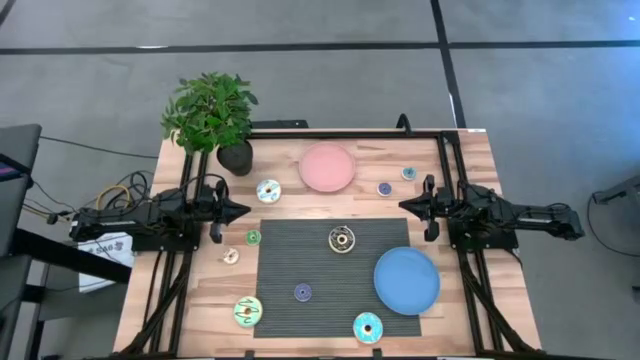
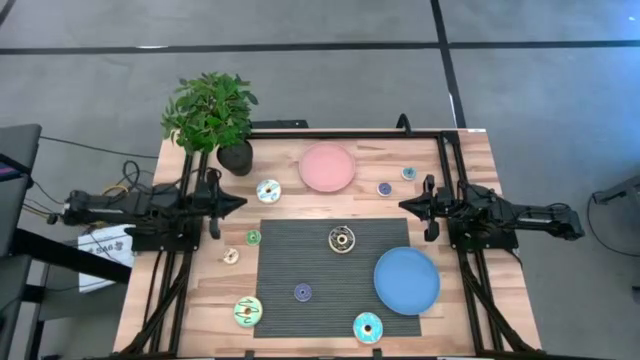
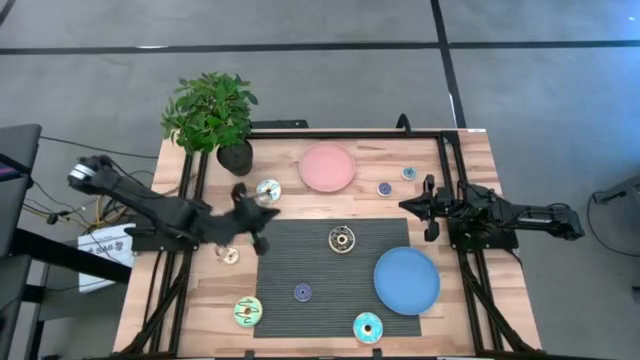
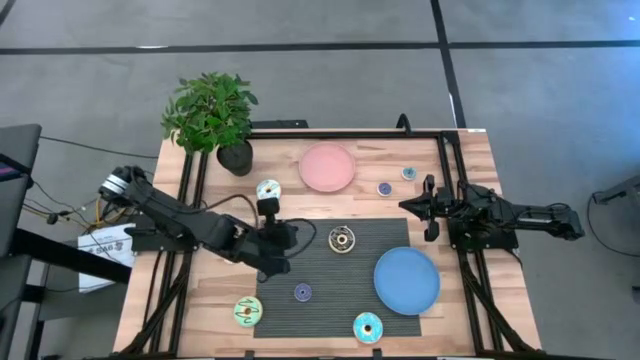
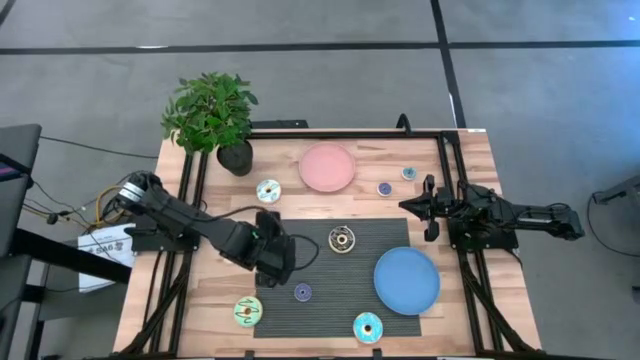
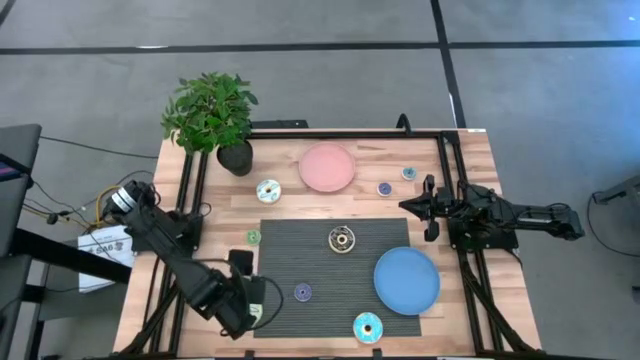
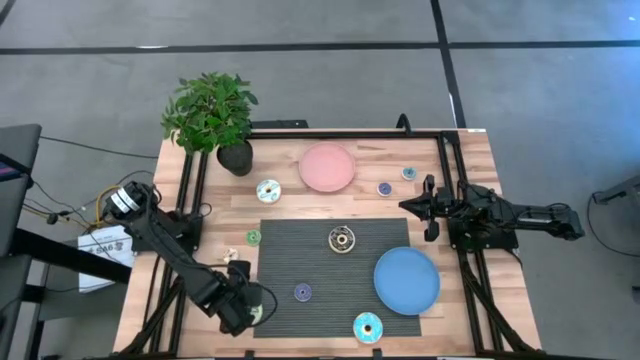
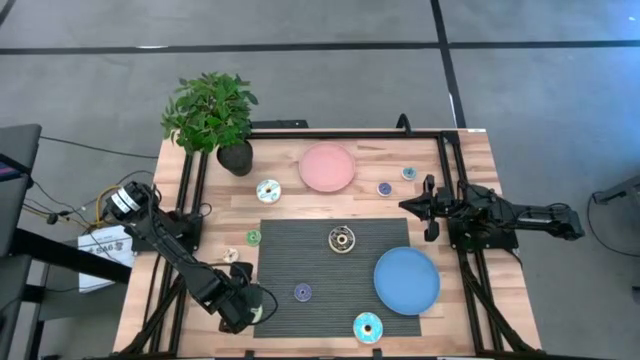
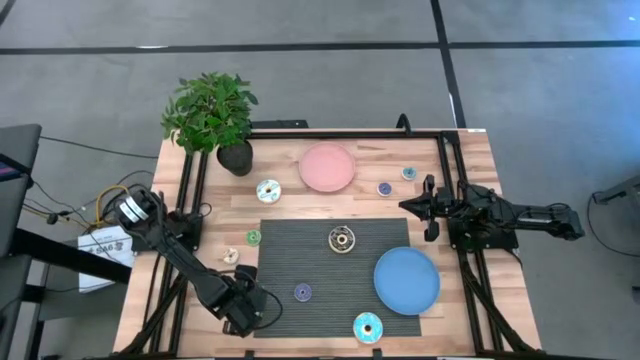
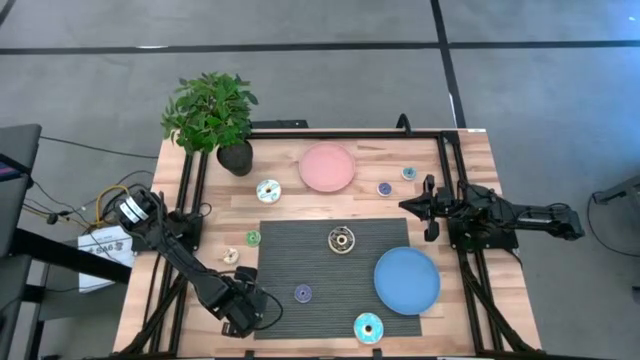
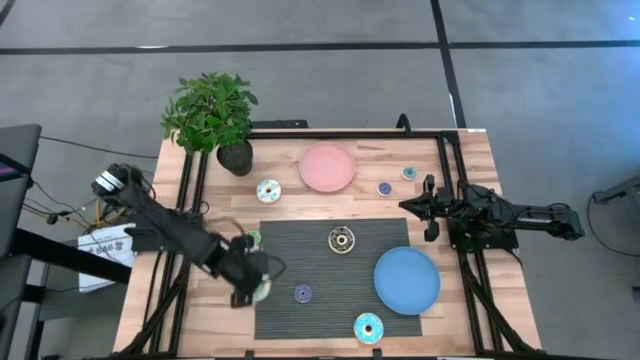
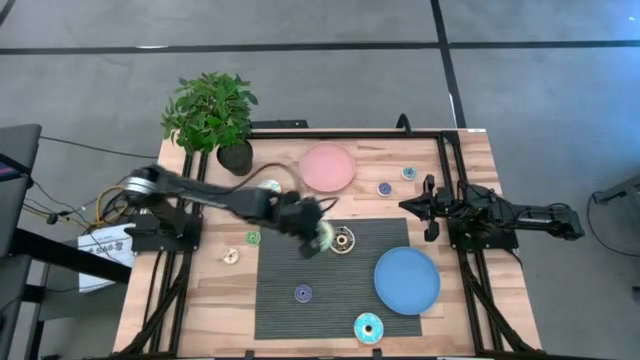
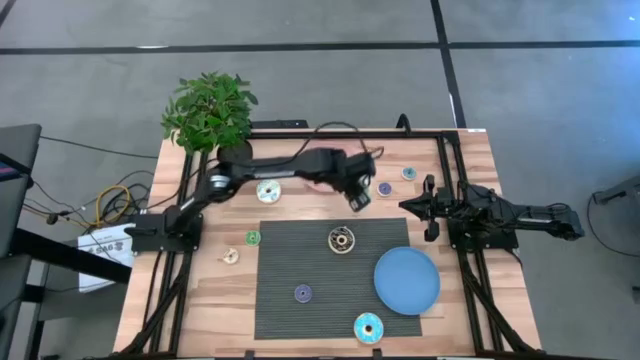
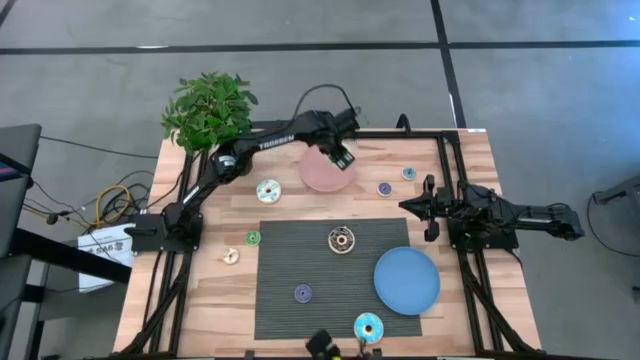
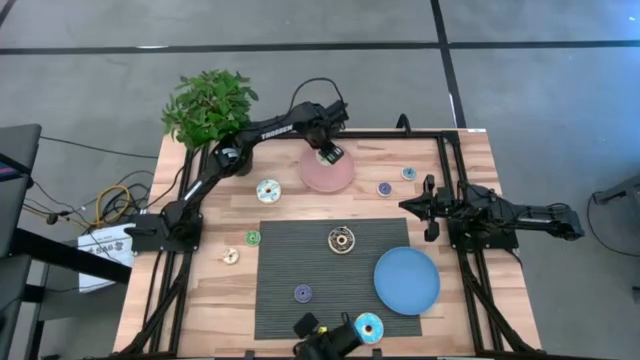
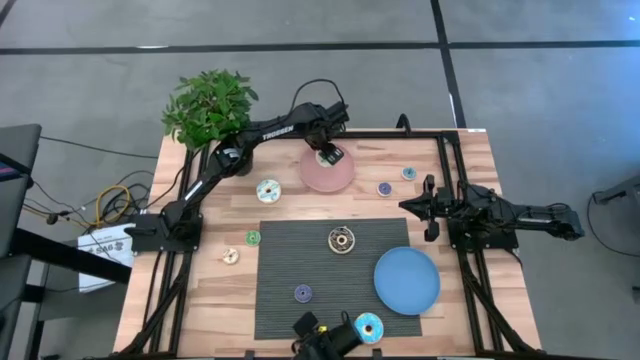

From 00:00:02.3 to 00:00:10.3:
Task: Pick & Place donuts
Put the large blue donut on the pink plate

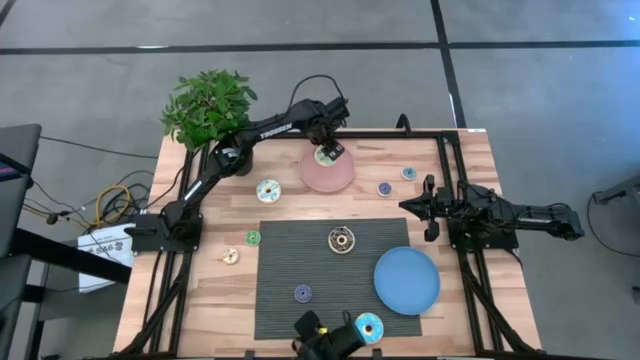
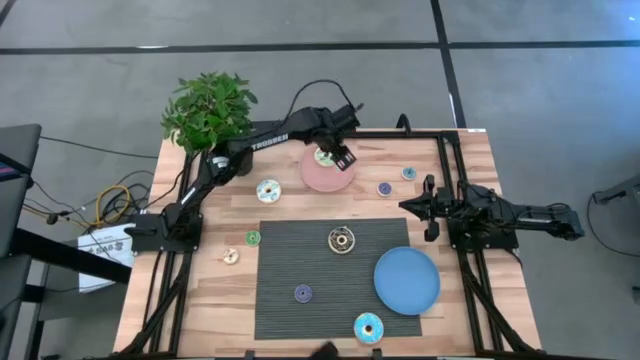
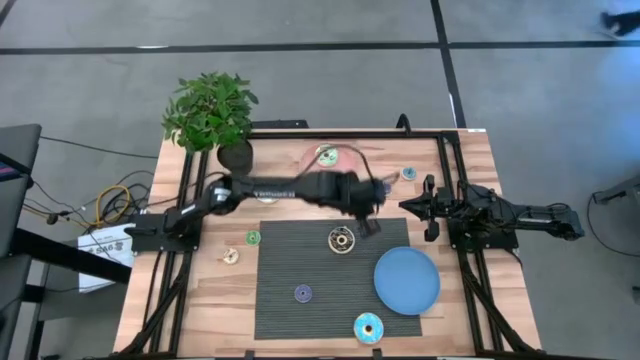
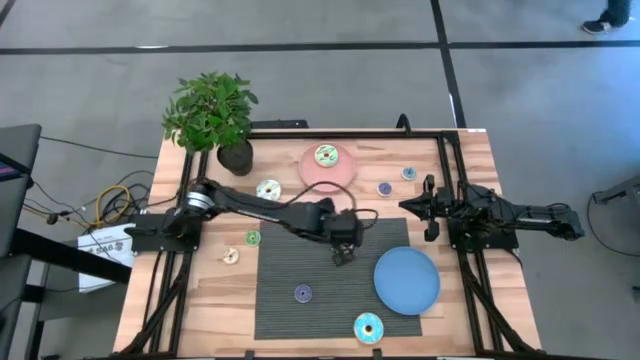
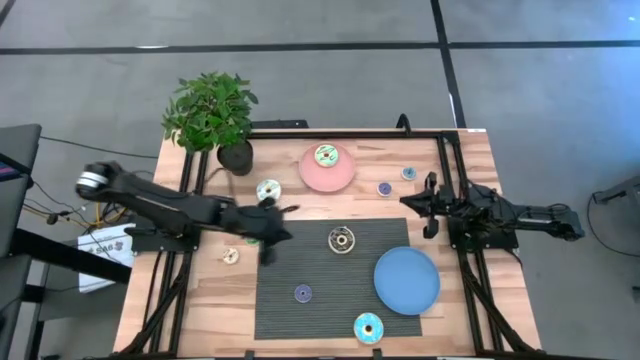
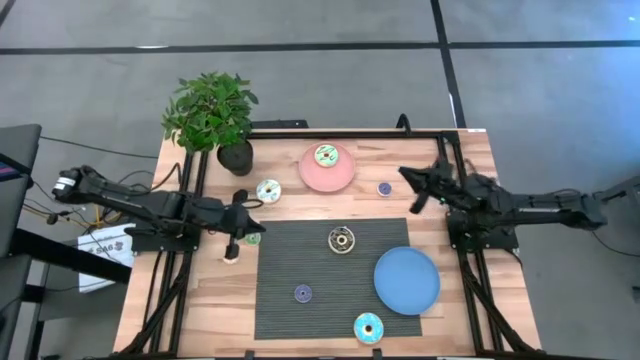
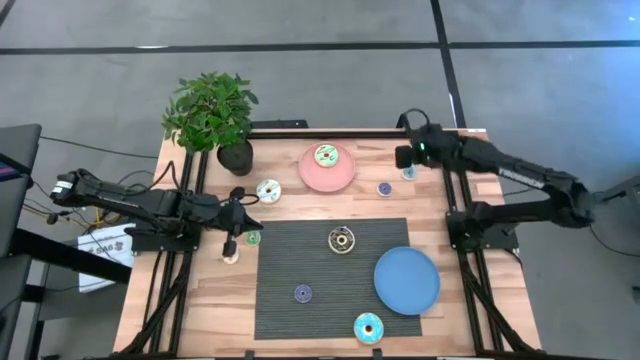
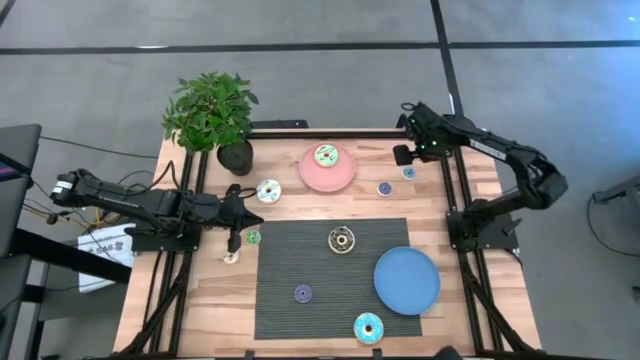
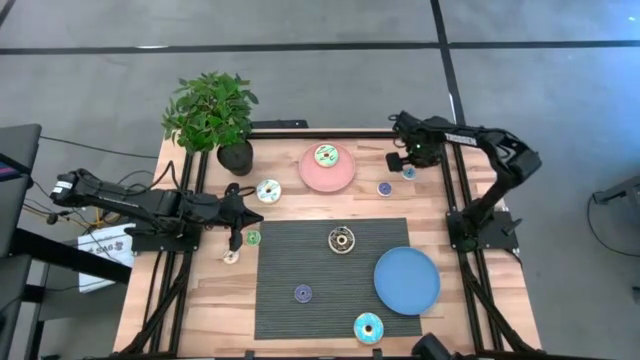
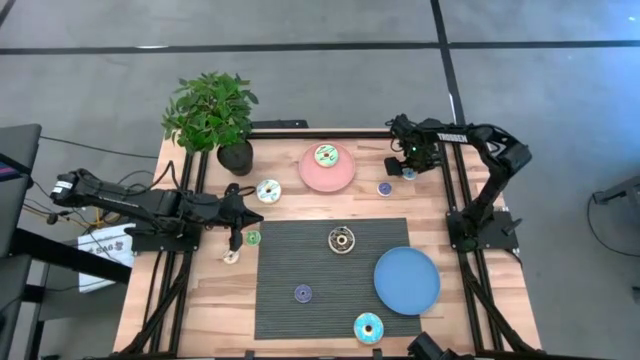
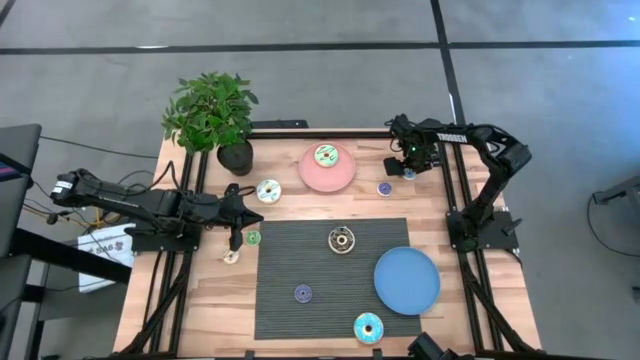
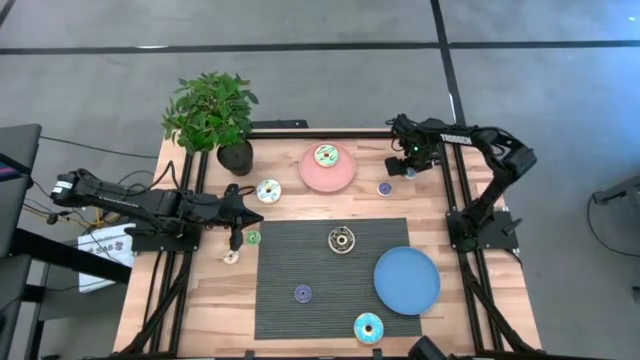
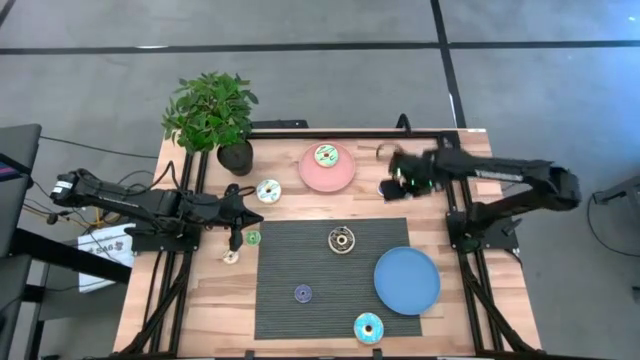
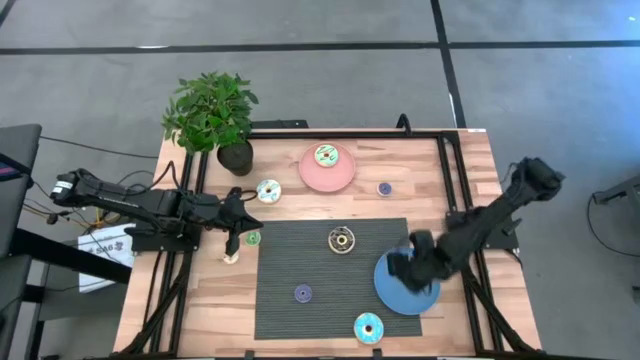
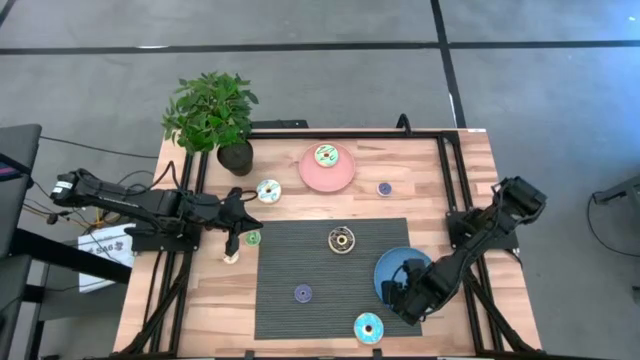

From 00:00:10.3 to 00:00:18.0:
Put the small blue donut on the blue plate

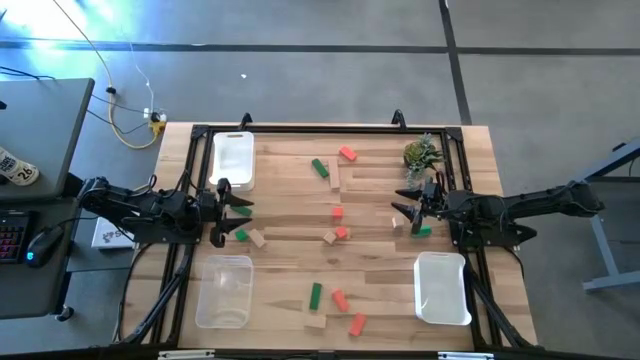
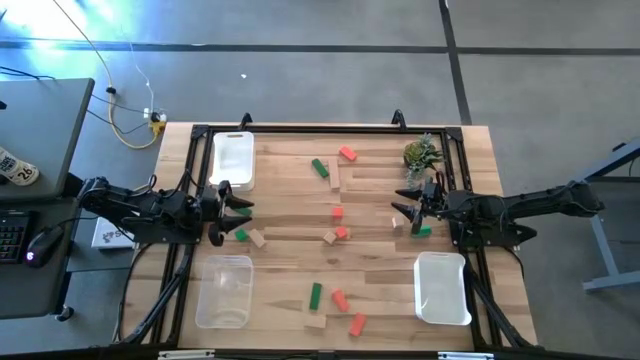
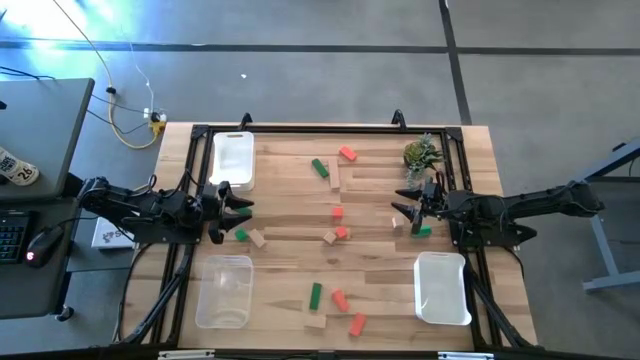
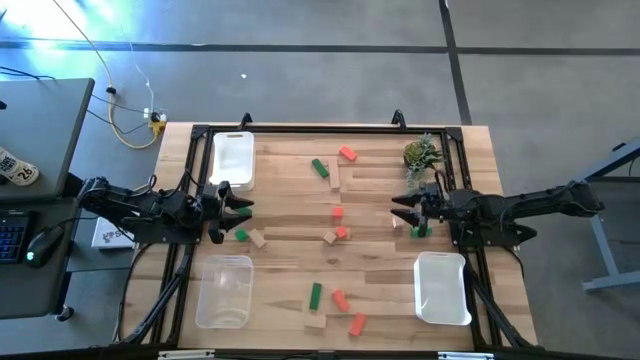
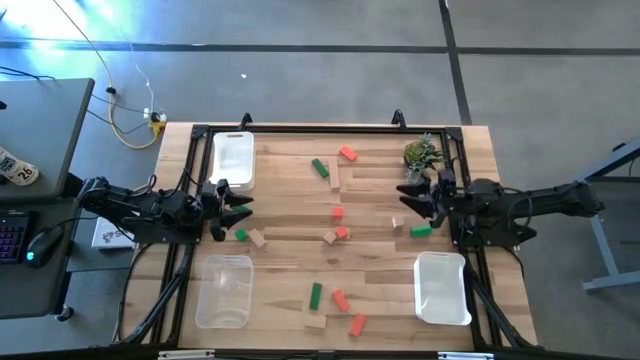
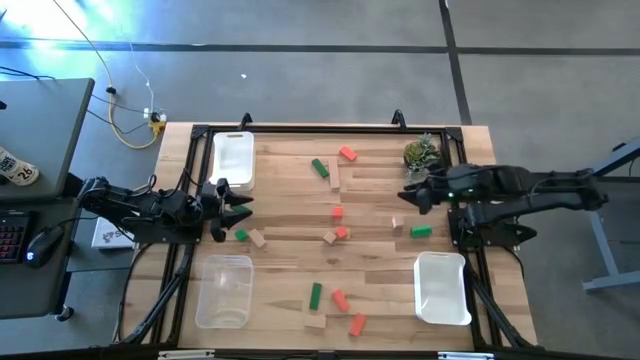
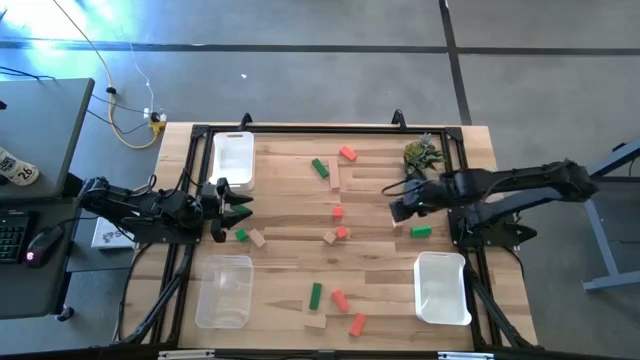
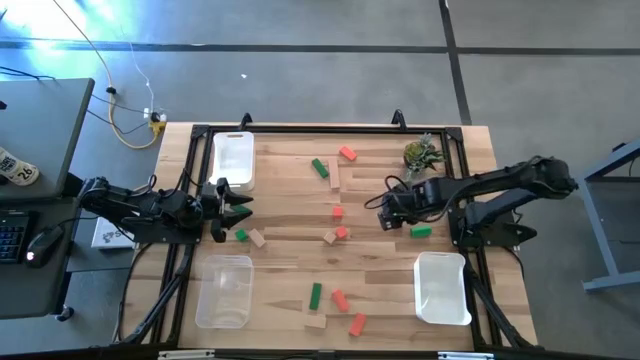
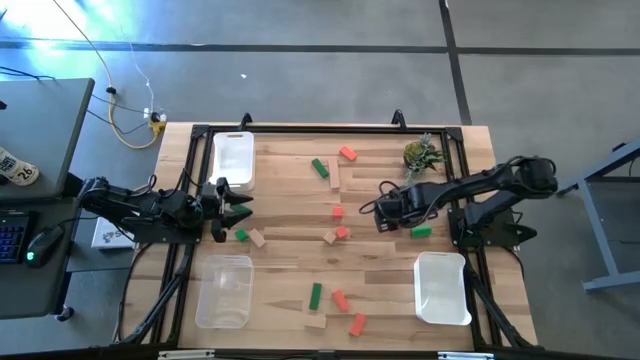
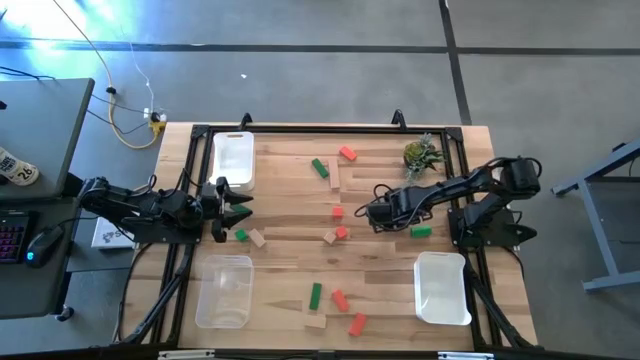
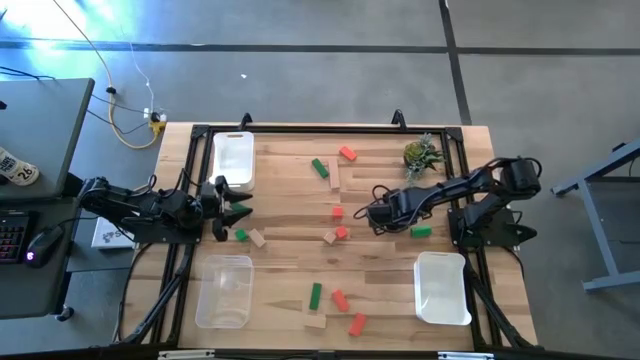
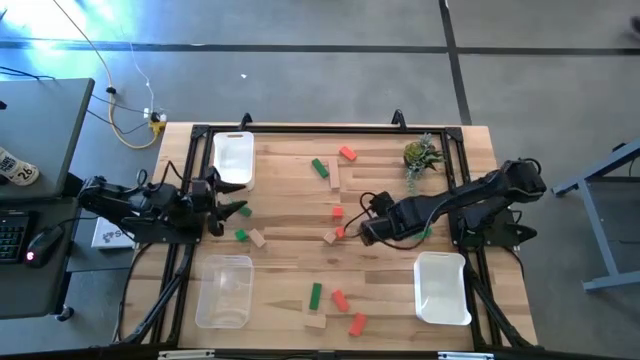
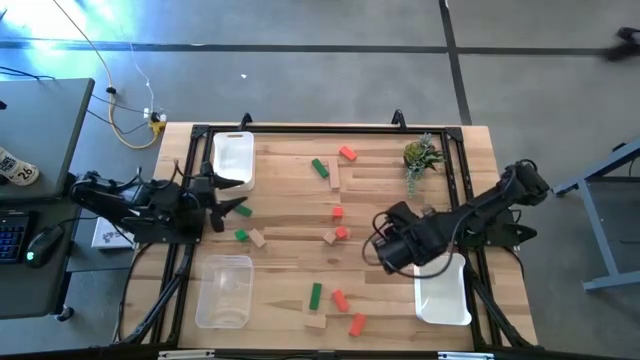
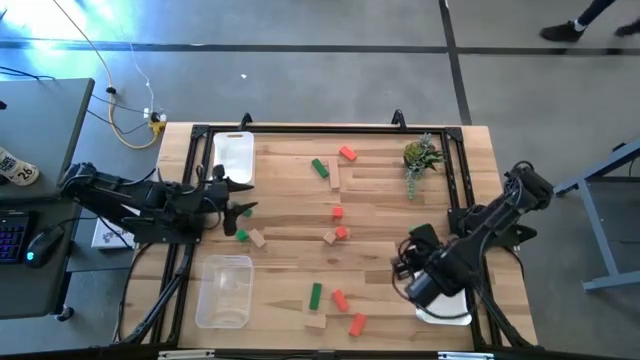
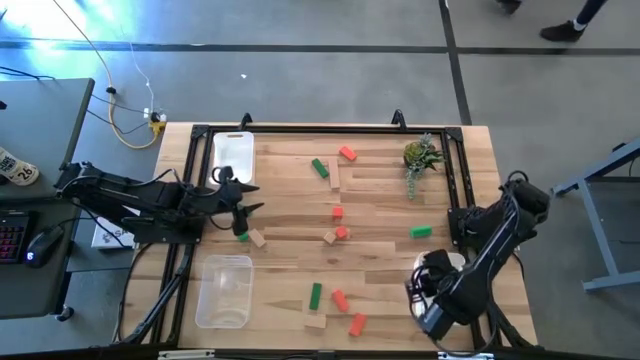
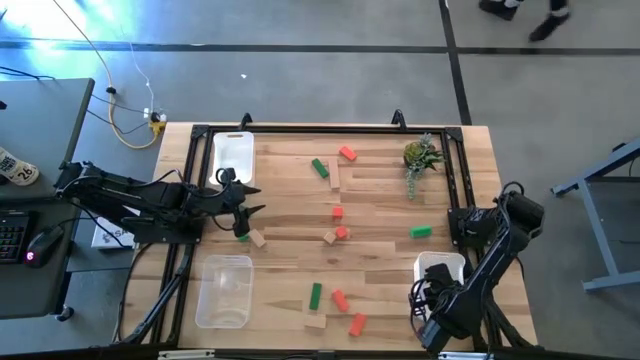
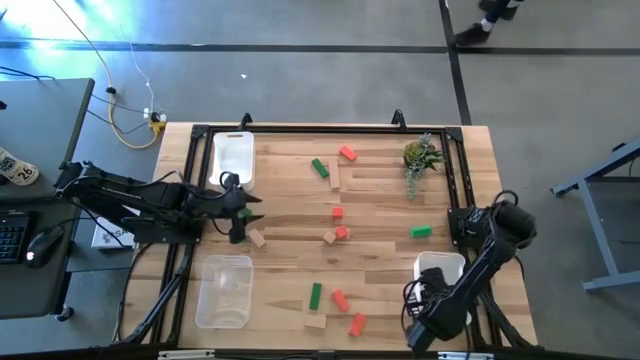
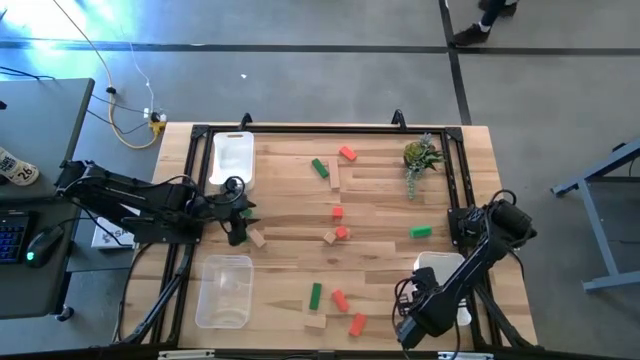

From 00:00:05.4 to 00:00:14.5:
Task: Sort & place blocks by color
Put the brown block into the bottom white bin
